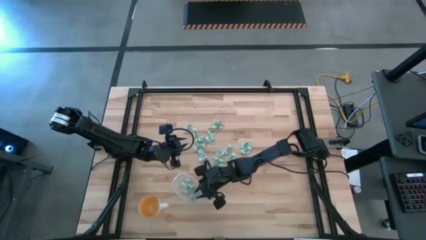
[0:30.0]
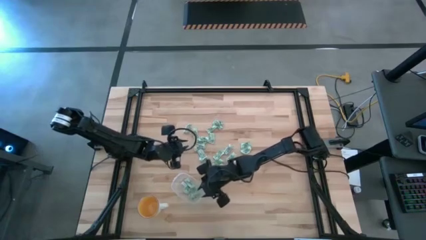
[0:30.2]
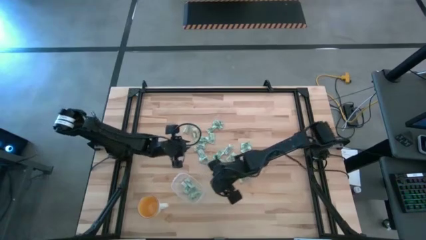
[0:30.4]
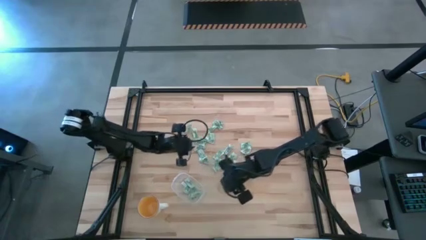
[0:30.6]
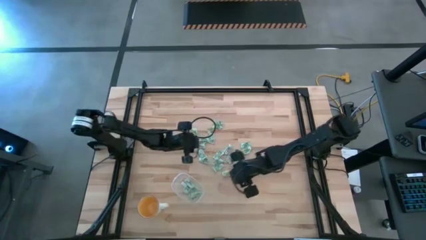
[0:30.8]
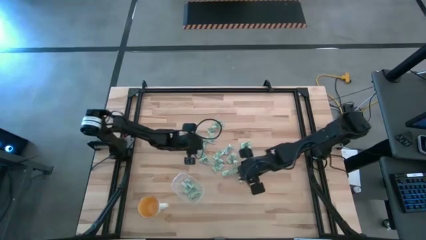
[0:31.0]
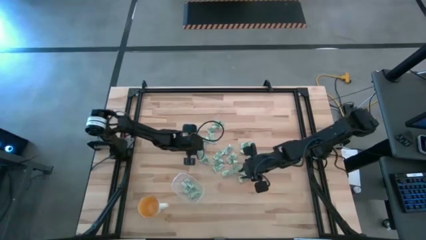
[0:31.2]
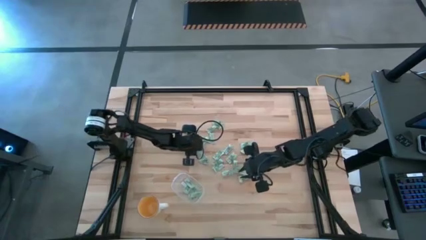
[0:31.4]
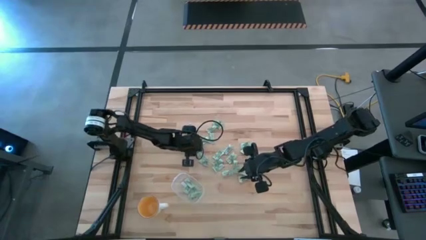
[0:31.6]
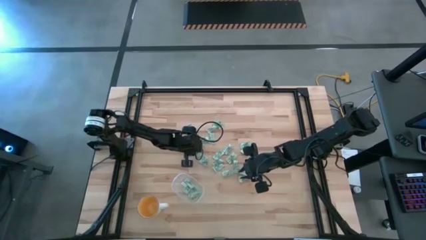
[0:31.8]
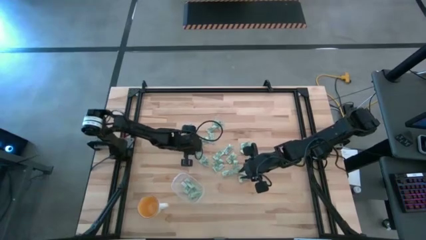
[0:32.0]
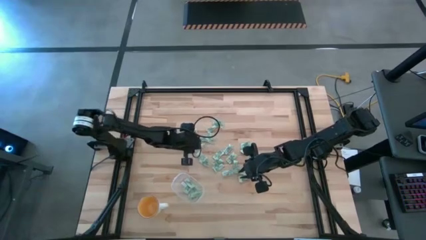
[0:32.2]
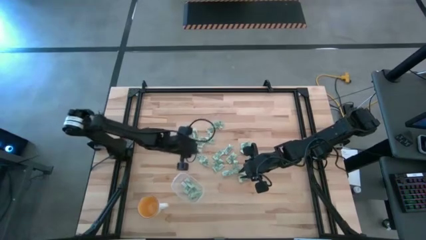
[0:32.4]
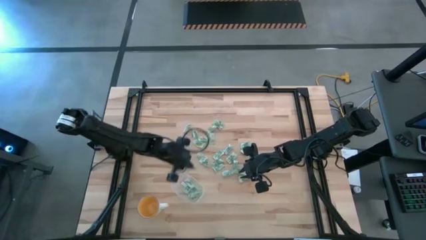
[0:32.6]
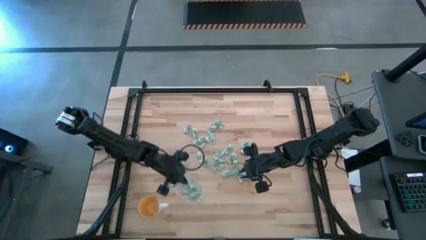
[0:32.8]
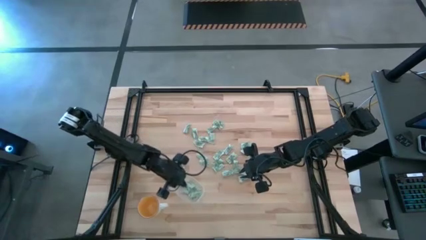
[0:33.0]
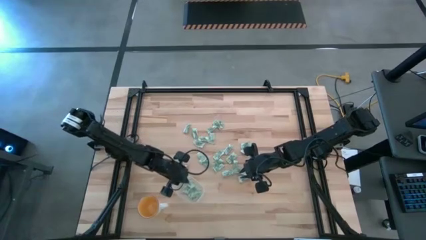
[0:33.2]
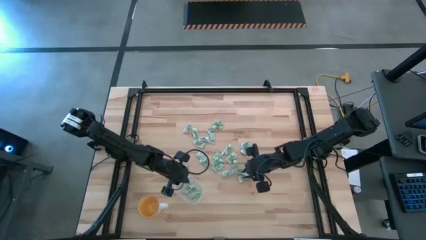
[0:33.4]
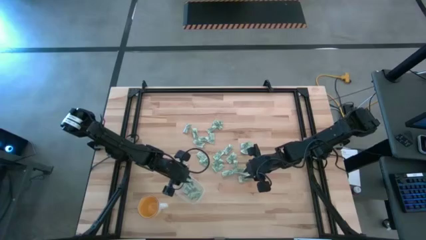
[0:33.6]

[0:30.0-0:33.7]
Task: Pick and place Stevia / Truvia into bins
Put the stevia packet into the transparent container

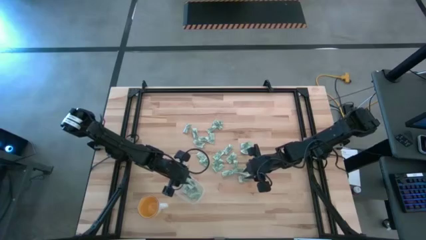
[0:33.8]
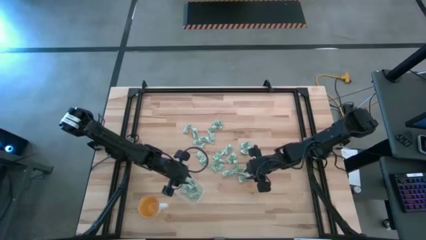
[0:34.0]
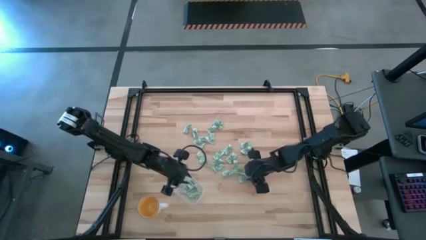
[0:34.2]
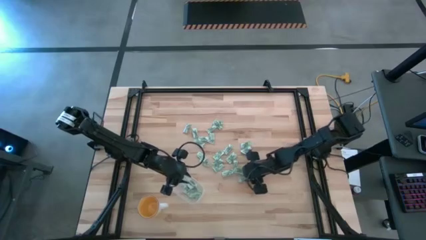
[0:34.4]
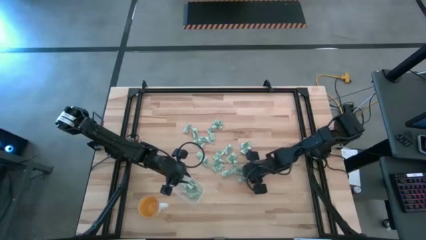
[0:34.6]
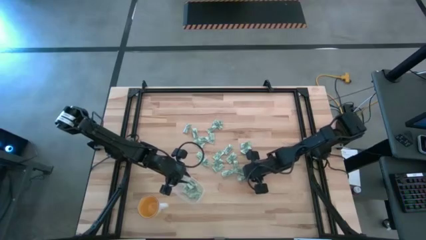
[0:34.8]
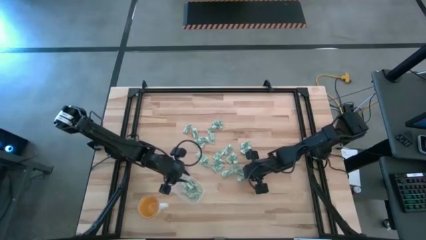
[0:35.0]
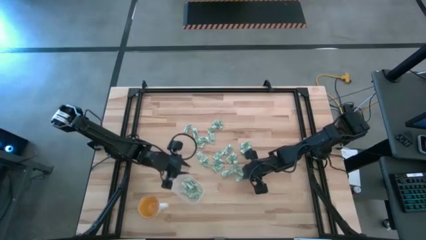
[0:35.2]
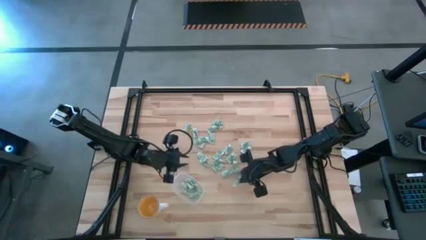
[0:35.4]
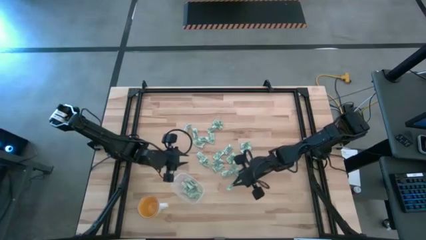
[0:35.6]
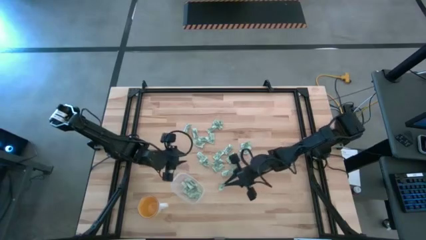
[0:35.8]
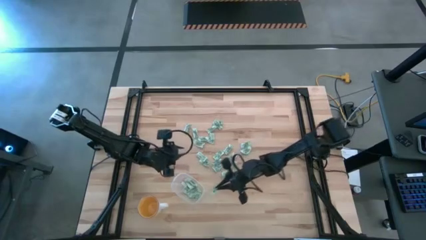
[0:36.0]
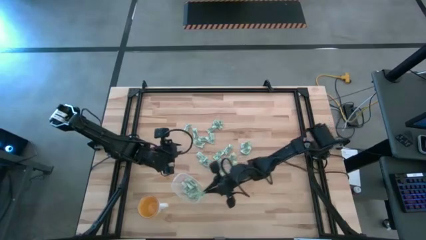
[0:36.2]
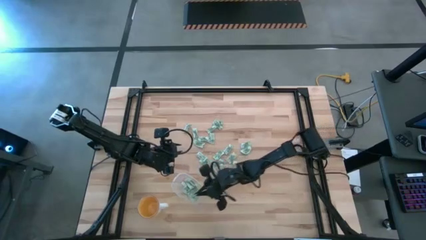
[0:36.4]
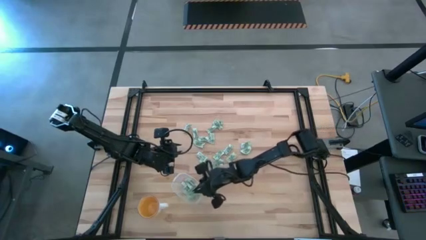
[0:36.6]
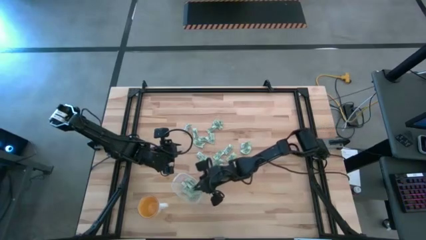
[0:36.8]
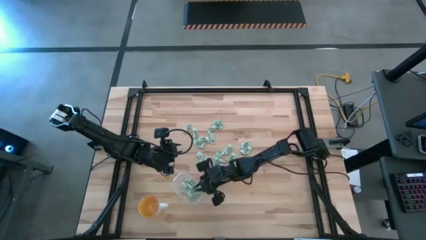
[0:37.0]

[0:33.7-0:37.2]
Put the stevia packet into the transparent container

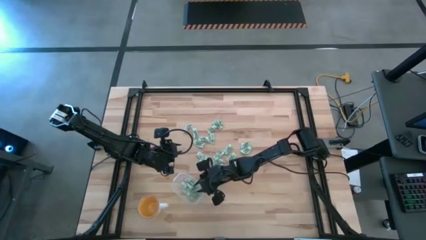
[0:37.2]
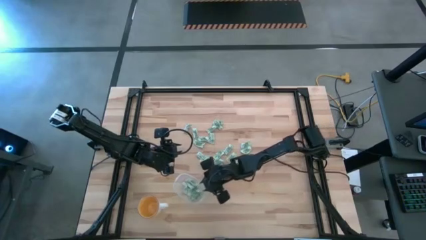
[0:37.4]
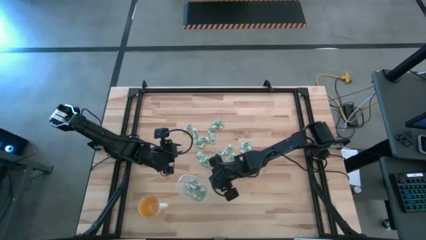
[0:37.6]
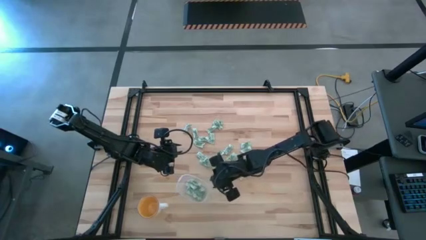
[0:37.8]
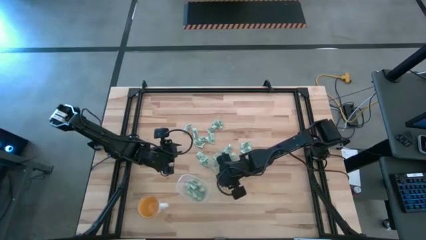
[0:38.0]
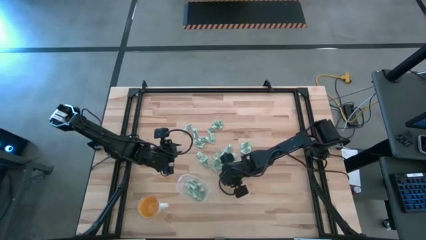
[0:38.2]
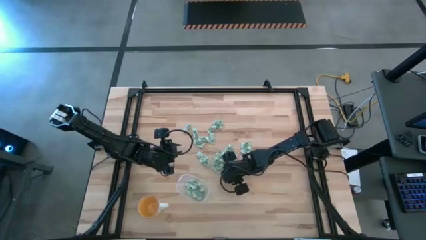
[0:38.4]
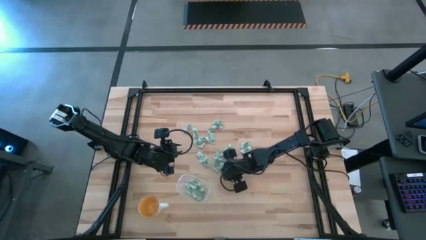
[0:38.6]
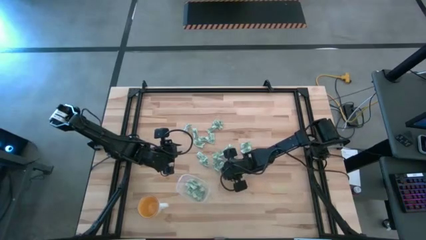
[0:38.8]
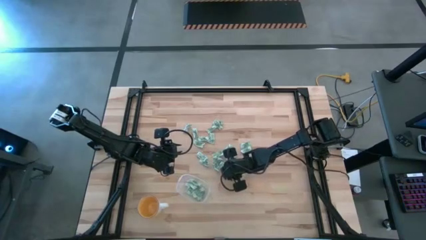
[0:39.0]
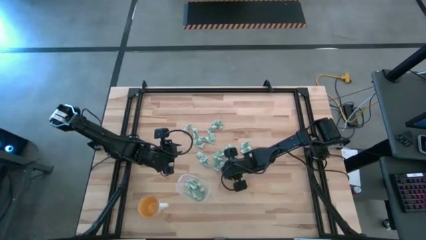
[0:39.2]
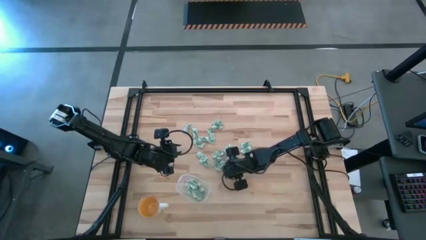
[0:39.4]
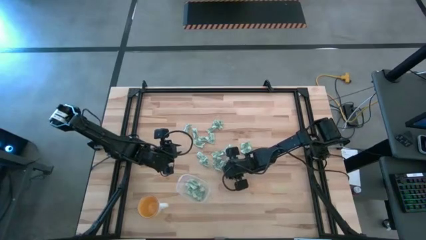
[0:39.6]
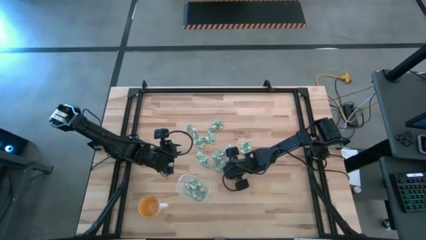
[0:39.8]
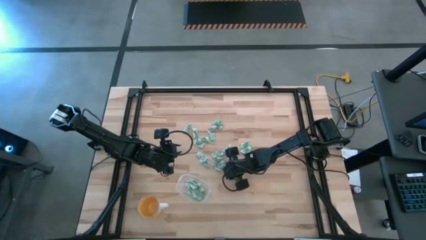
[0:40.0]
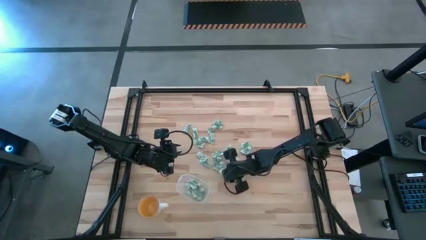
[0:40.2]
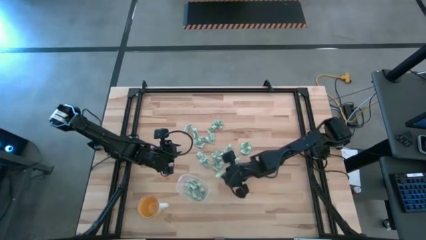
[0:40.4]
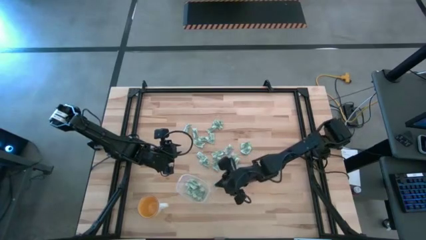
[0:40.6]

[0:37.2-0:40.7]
Put the stevia packet into the transparent container

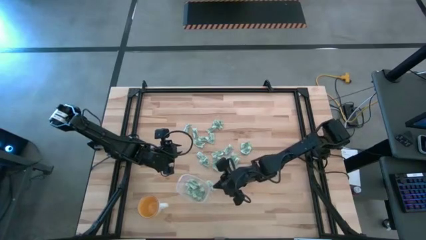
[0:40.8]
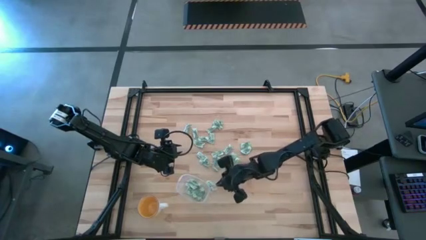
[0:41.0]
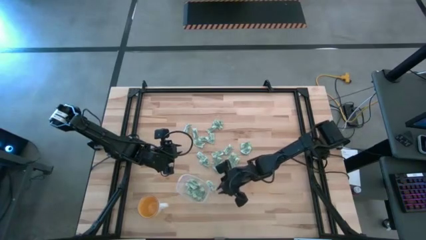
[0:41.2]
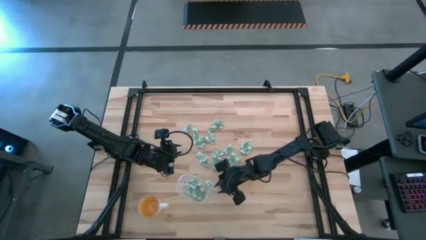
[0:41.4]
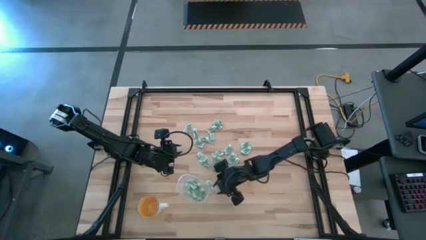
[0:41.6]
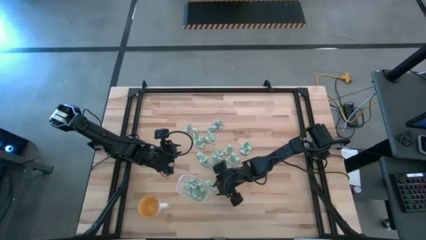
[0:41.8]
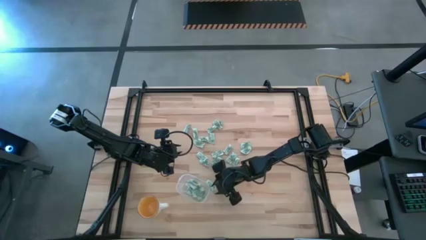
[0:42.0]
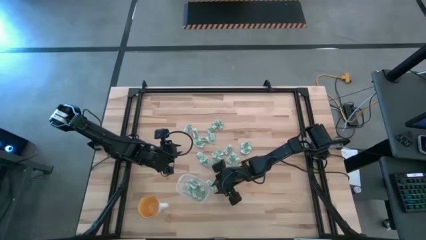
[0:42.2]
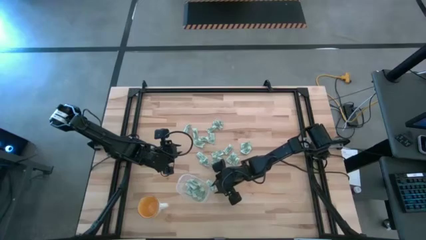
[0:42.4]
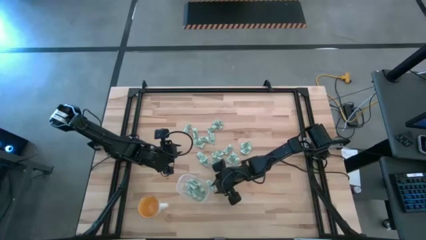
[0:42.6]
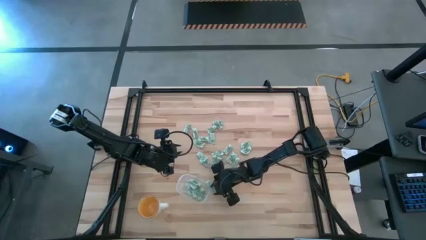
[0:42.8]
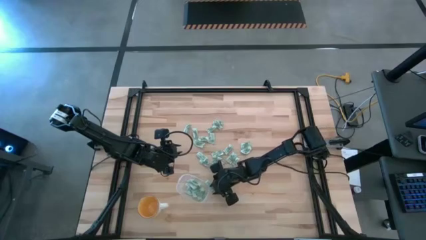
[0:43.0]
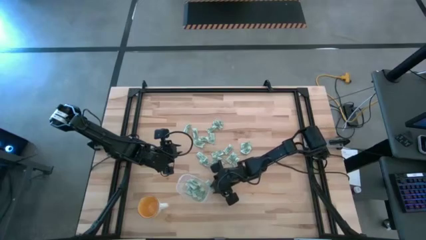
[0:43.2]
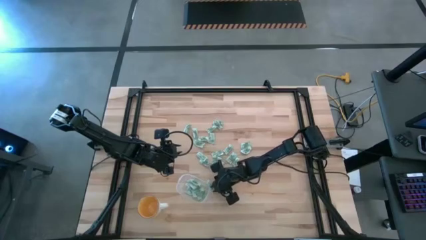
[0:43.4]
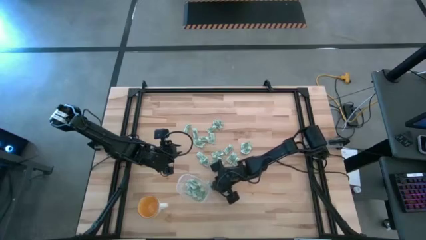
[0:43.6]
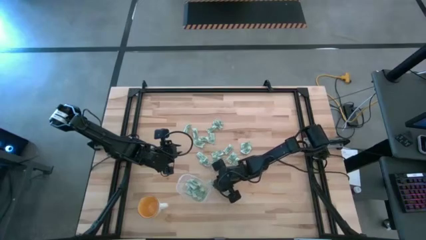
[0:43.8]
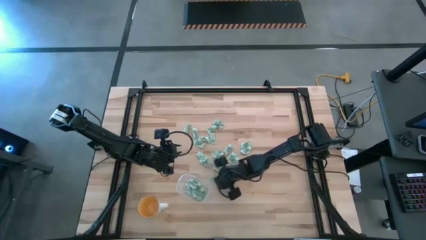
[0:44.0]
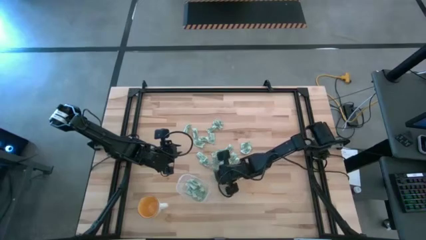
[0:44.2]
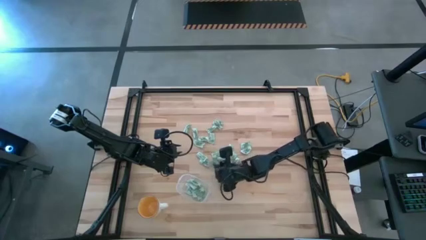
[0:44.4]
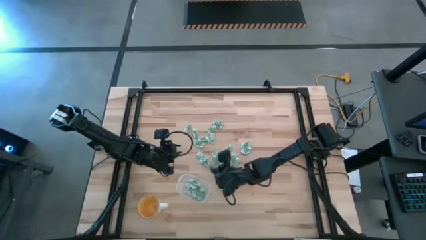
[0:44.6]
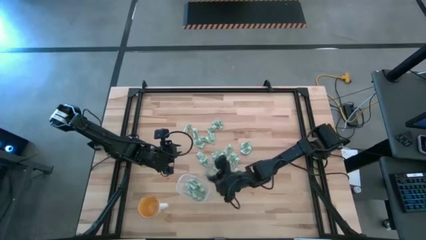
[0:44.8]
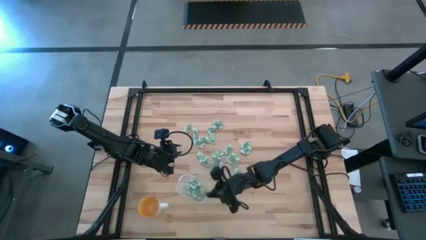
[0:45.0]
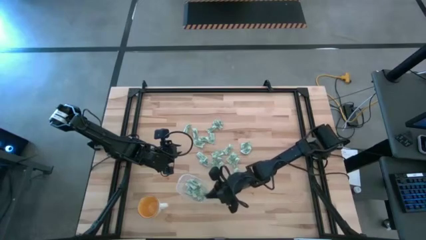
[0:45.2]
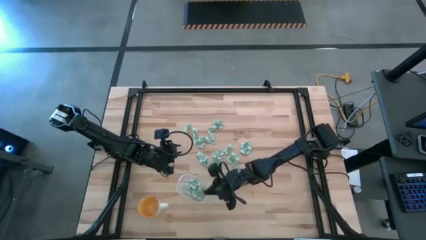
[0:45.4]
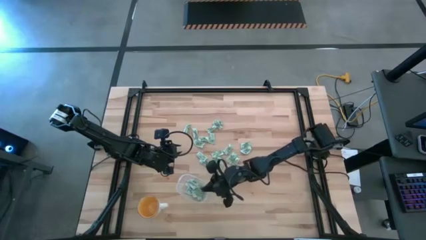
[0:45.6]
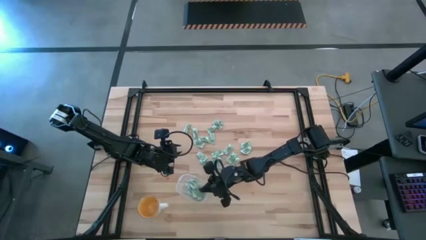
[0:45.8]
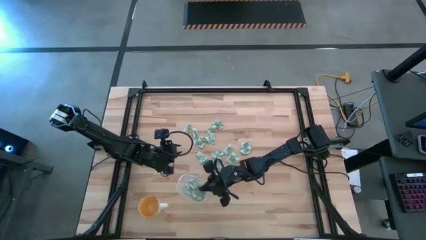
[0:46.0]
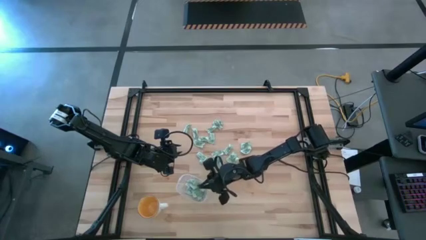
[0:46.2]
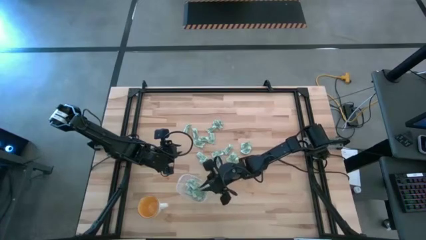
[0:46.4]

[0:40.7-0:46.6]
Put the stevia packet into the transparent container

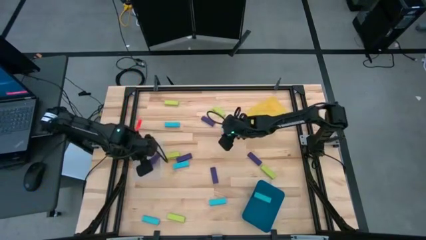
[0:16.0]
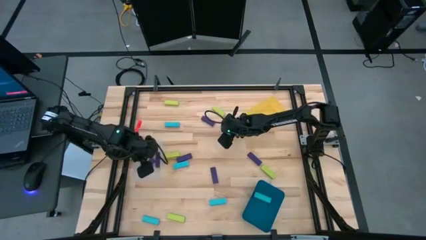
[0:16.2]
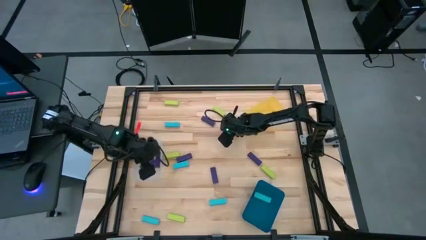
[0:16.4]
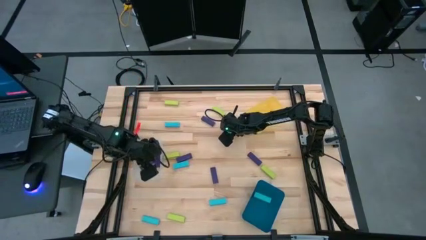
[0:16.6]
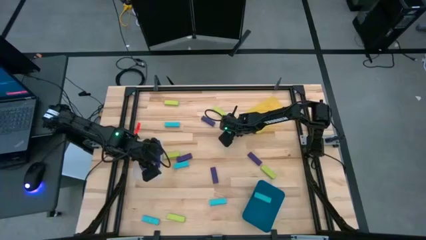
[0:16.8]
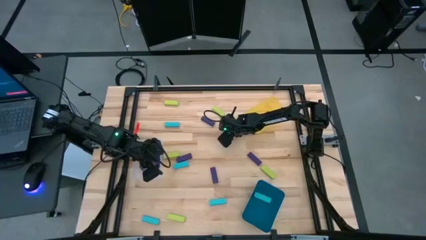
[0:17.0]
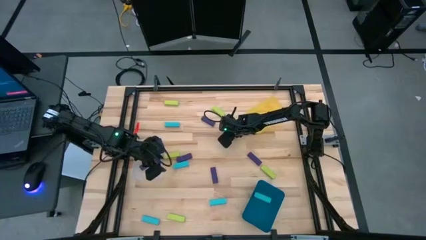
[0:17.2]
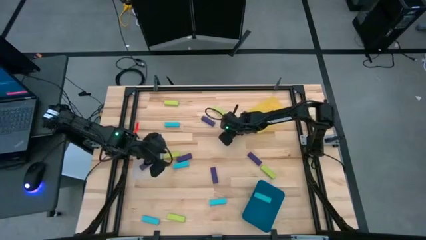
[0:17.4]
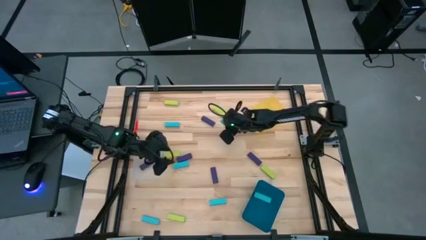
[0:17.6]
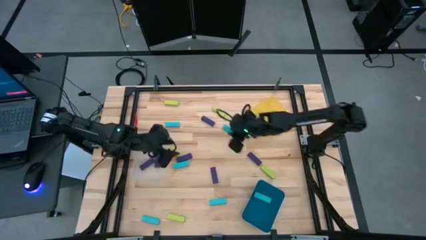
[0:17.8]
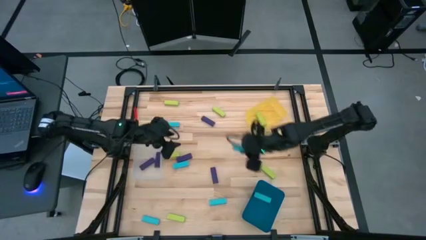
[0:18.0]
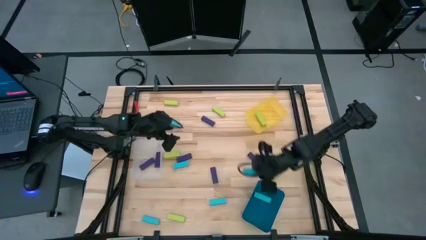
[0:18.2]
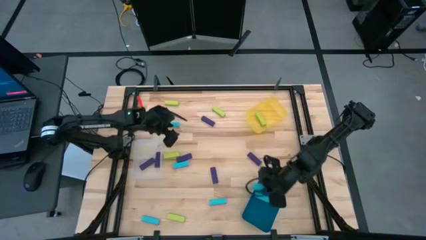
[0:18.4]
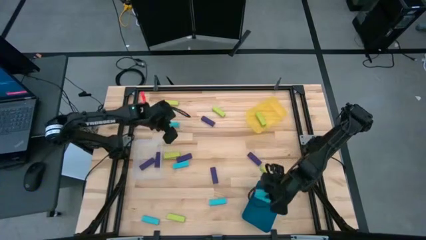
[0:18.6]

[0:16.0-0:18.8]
Task: Sort blocks
Put the light blue block into the blue bin
